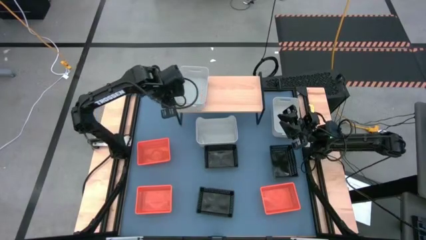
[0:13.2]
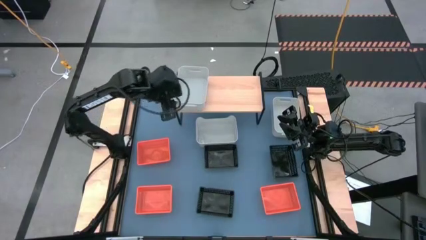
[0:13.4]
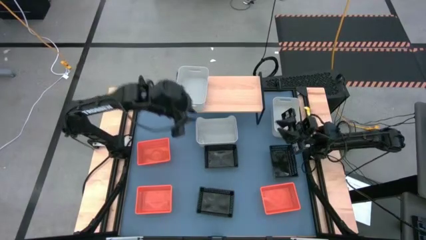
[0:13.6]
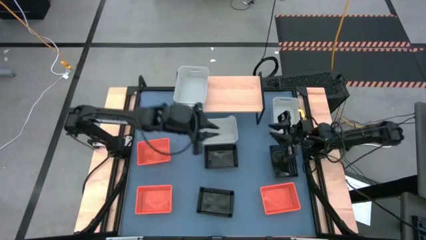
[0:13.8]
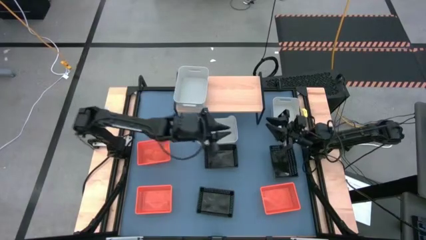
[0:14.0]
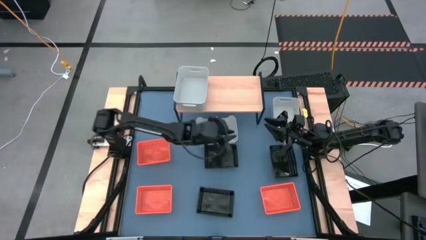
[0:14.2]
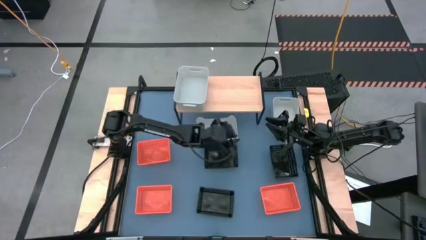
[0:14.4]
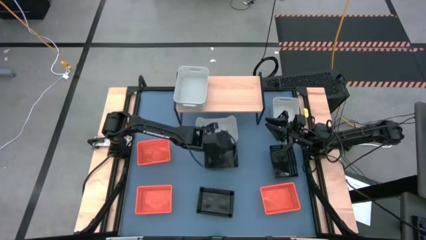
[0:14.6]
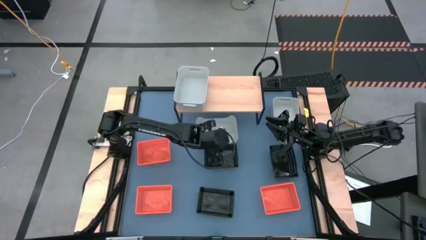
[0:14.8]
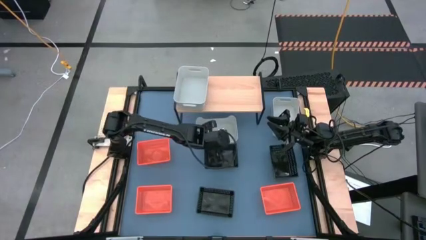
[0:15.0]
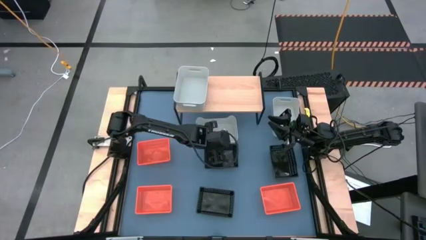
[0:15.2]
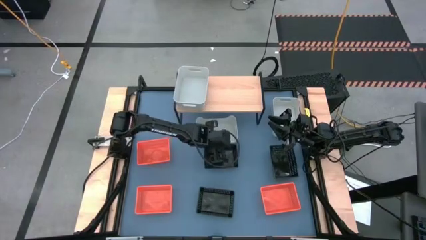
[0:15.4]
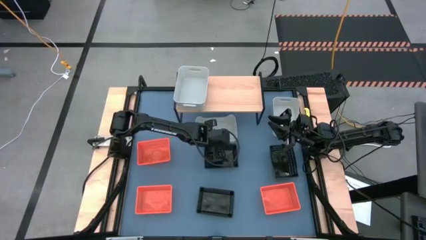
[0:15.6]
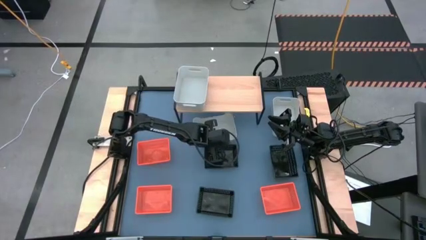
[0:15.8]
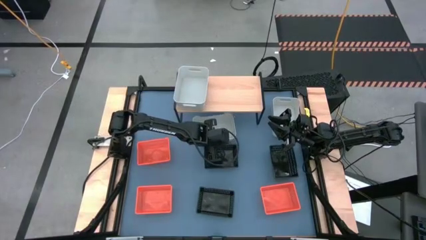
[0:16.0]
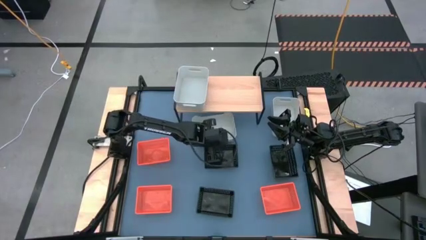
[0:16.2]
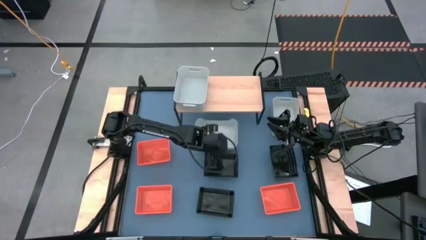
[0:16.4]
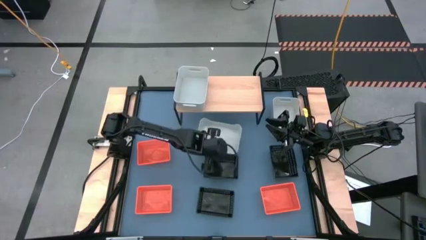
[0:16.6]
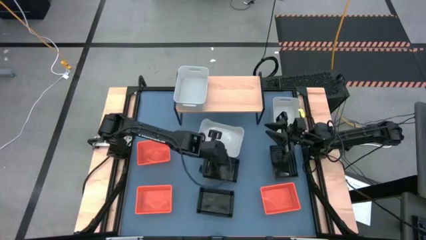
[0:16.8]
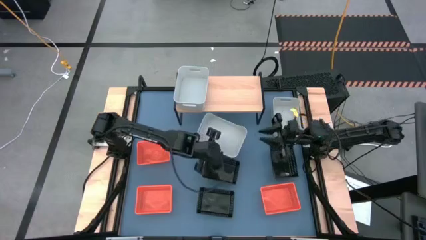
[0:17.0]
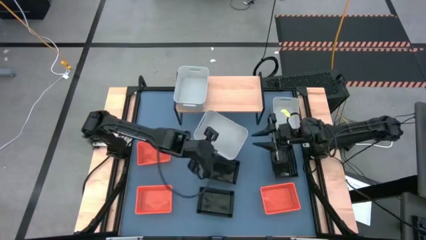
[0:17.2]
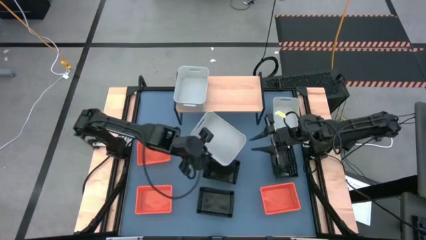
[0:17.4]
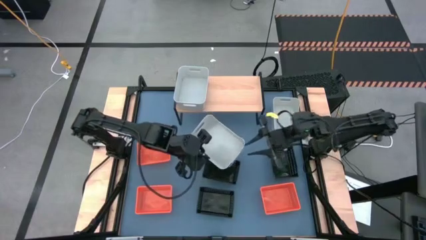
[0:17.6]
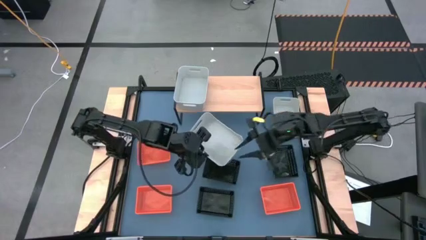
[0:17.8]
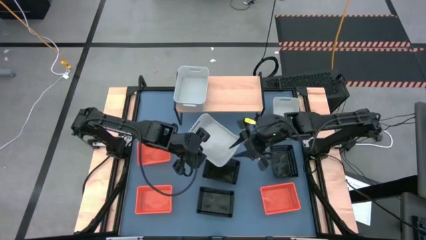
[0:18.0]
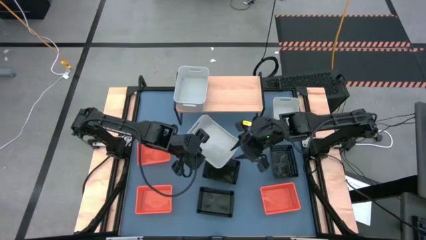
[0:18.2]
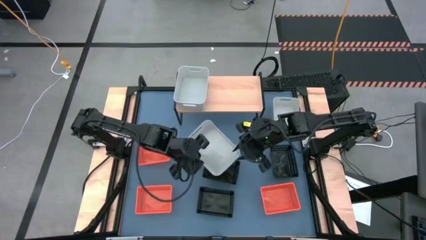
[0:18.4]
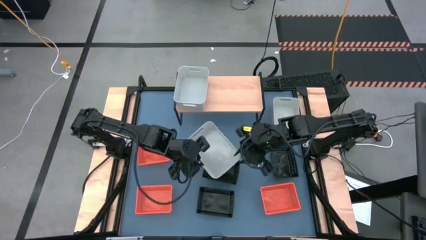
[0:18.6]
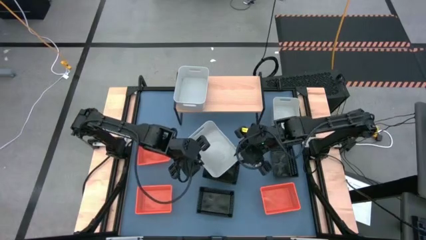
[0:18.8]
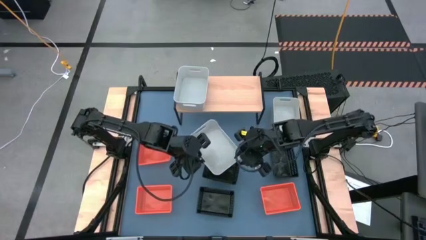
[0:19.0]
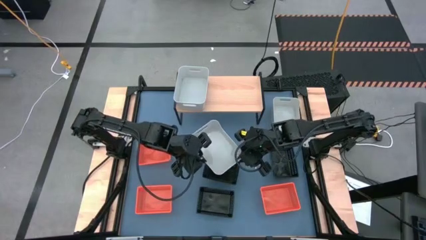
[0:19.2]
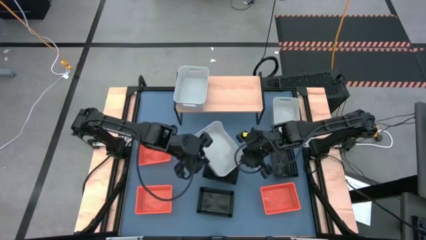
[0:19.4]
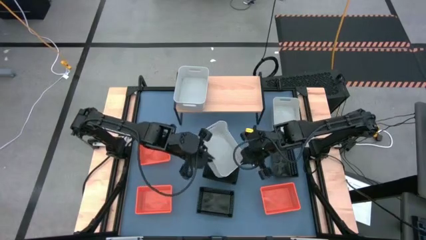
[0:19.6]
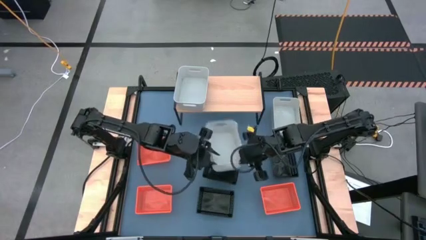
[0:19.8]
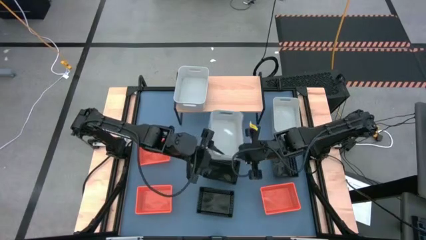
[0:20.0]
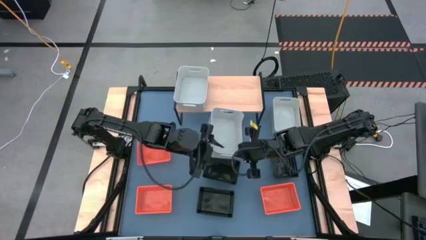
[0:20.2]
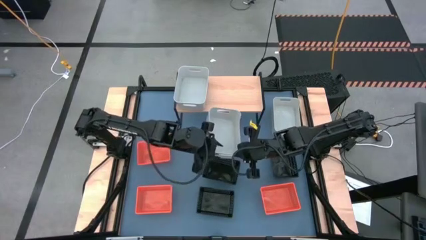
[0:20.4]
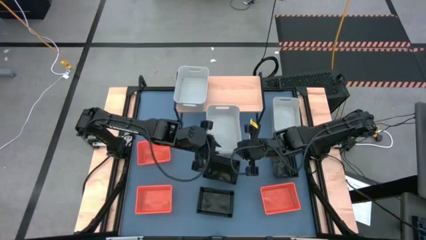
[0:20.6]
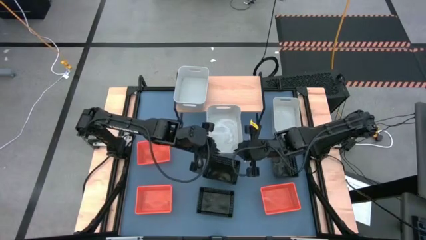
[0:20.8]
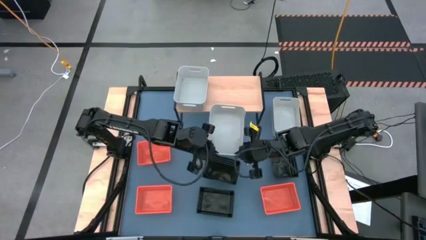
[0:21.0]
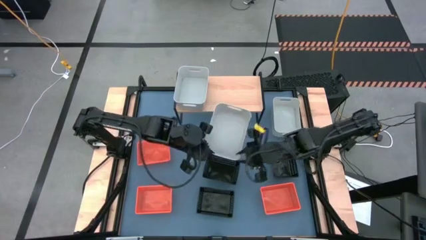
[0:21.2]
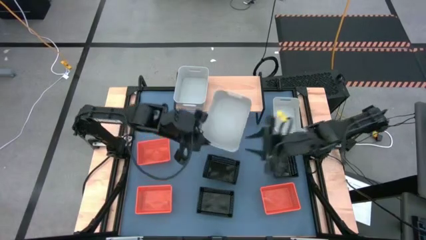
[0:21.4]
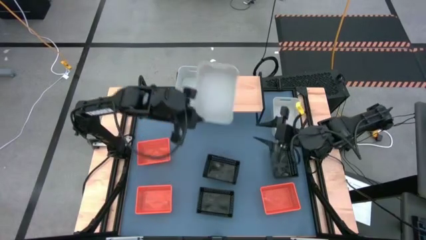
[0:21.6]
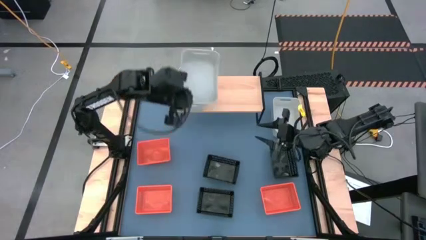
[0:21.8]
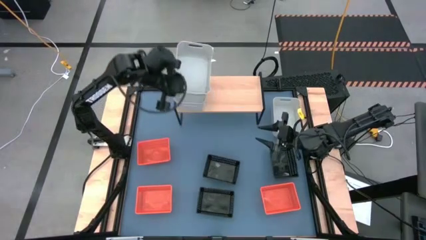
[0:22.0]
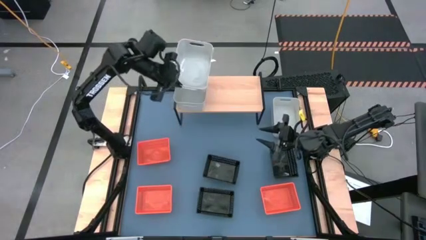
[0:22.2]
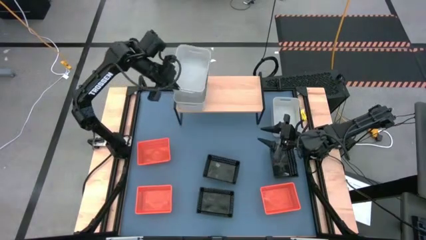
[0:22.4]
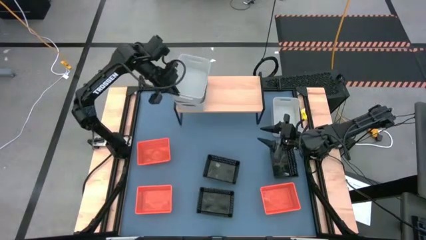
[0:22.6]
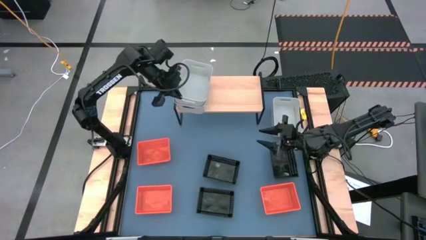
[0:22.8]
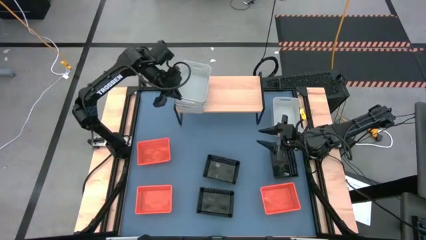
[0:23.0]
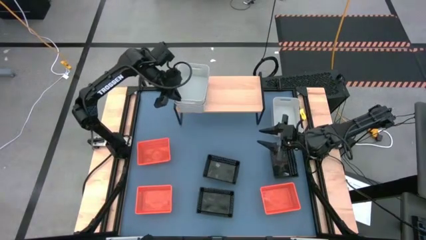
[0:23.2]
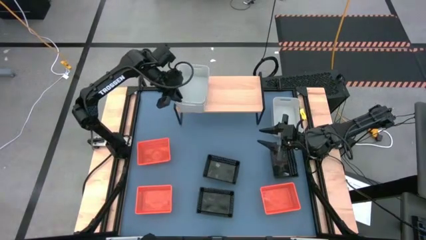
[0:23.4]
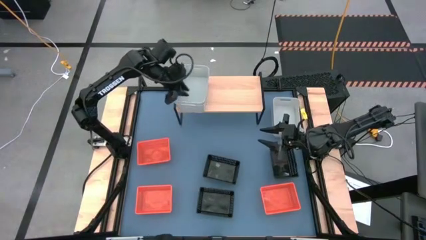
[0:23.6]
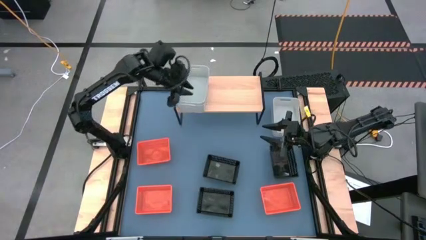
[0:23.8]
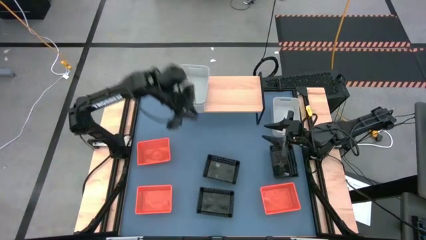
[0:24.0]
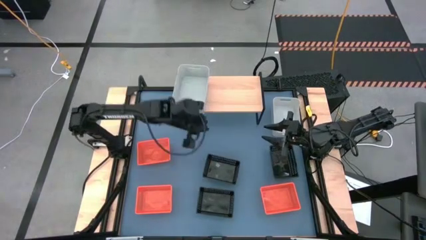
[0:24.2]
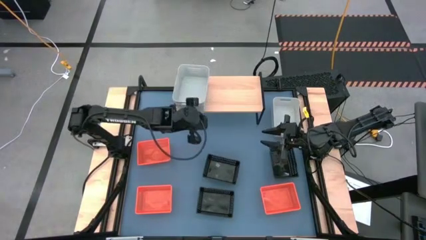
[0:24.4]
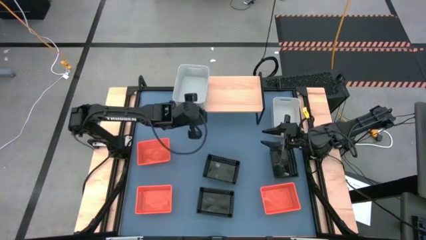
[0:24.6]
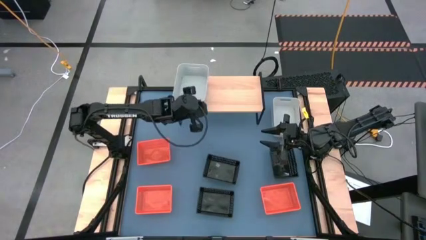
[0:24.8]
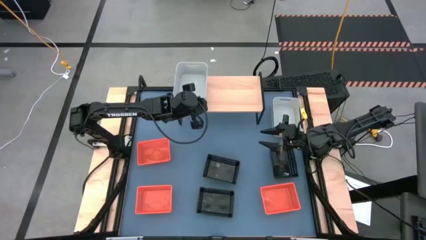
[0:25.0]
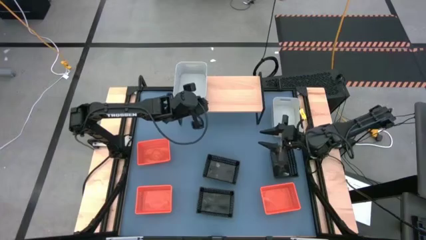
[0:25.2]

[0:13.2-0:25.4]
Task: Stack baskets on shelf by color
Stack the left gray bin on top of the other gray bin on the shelf
